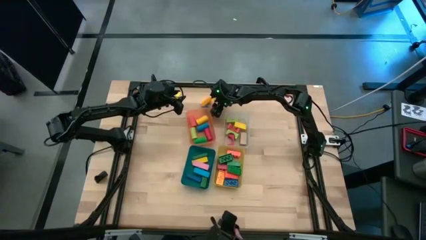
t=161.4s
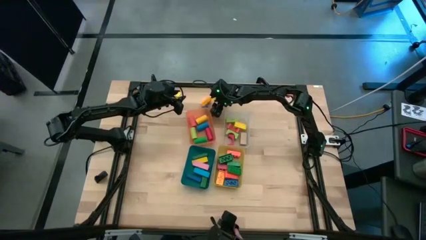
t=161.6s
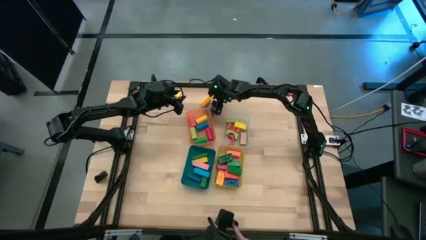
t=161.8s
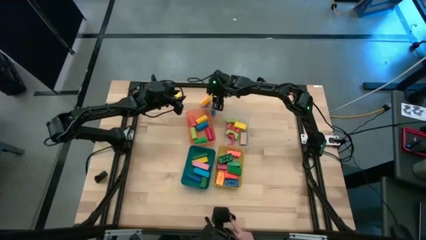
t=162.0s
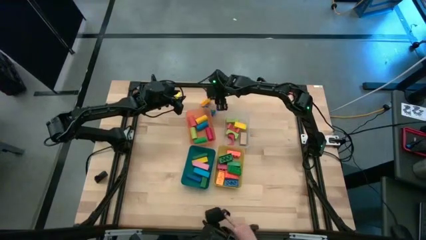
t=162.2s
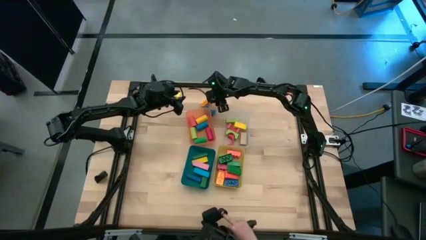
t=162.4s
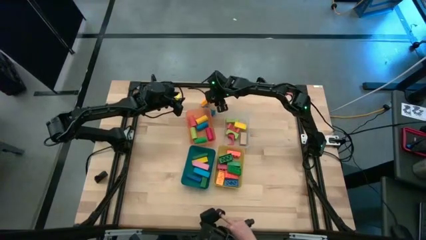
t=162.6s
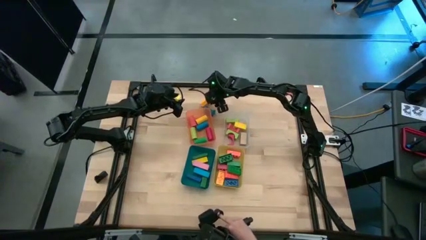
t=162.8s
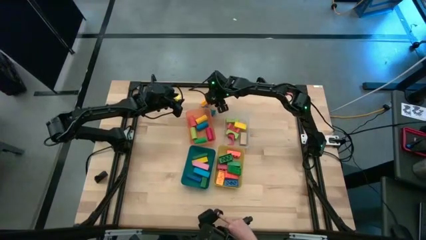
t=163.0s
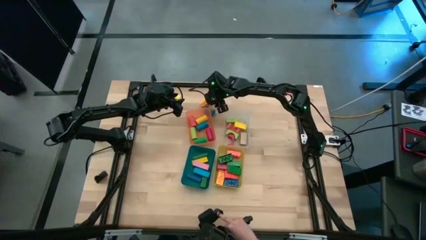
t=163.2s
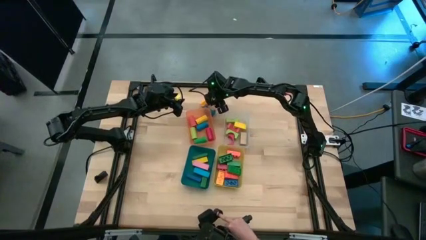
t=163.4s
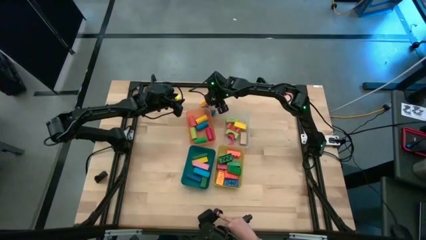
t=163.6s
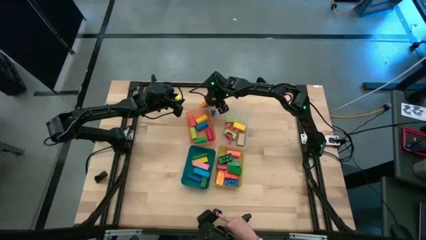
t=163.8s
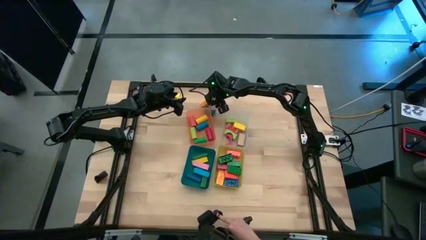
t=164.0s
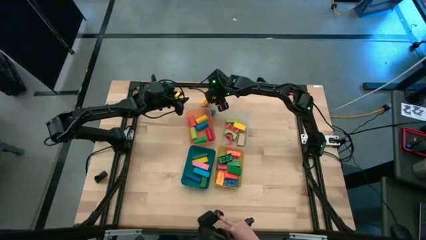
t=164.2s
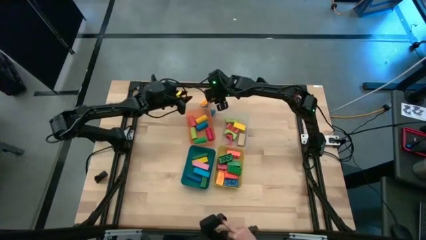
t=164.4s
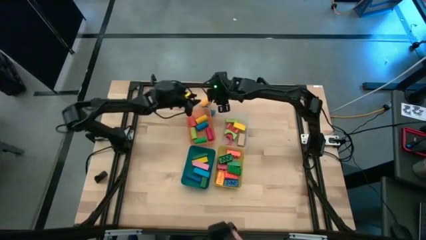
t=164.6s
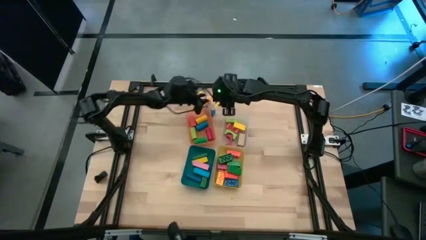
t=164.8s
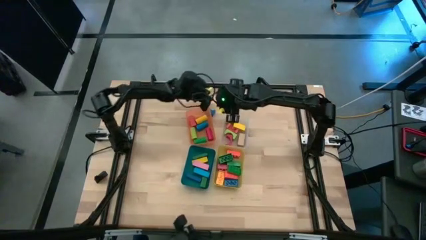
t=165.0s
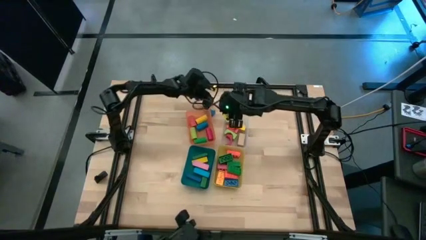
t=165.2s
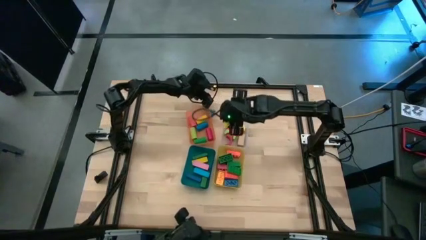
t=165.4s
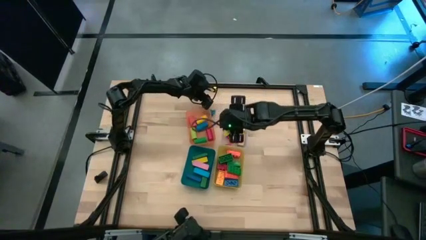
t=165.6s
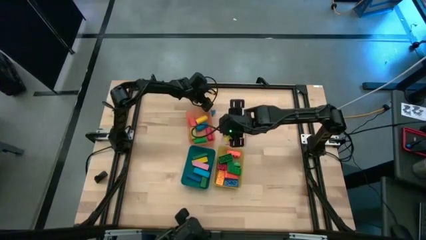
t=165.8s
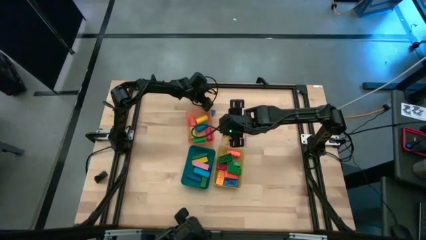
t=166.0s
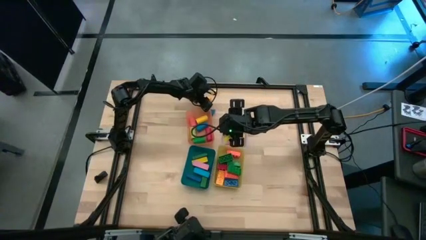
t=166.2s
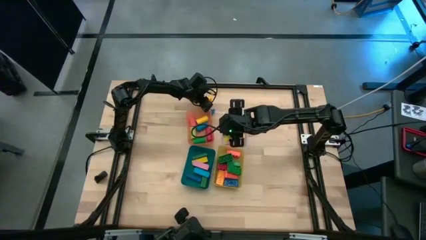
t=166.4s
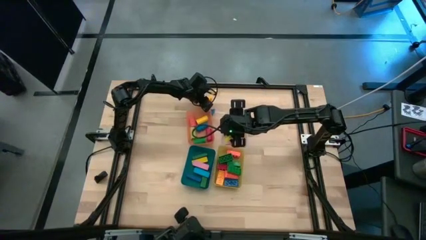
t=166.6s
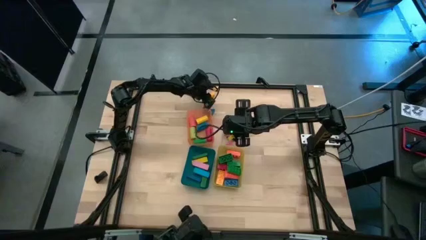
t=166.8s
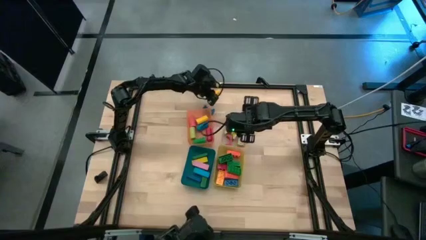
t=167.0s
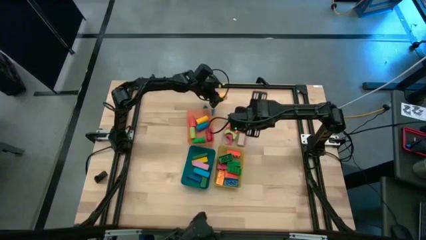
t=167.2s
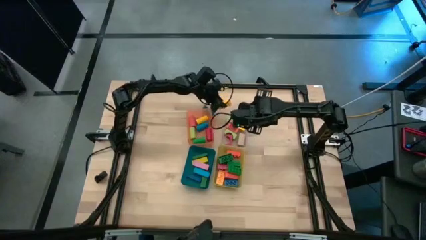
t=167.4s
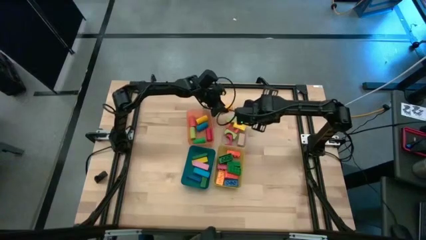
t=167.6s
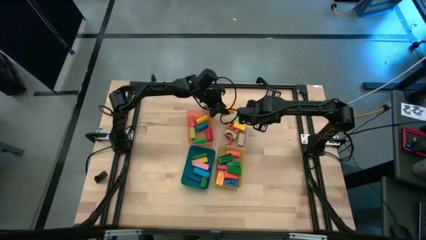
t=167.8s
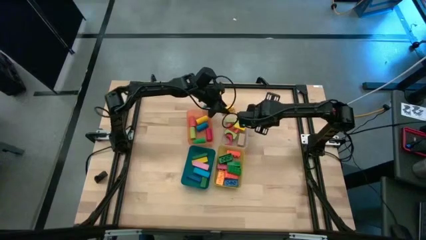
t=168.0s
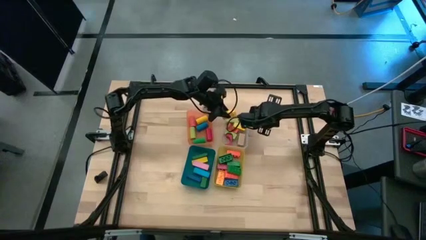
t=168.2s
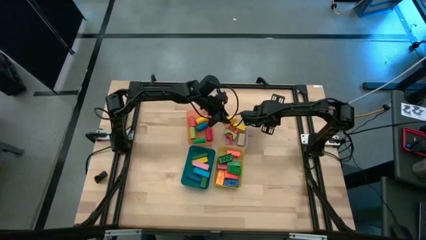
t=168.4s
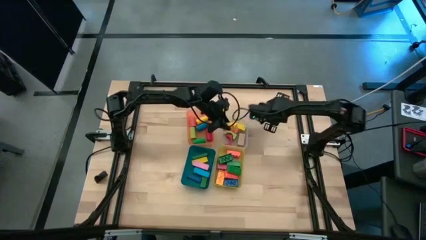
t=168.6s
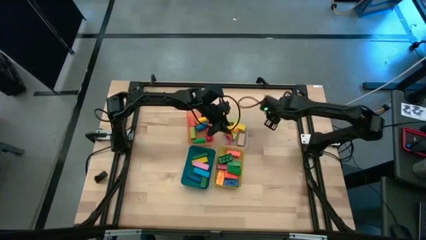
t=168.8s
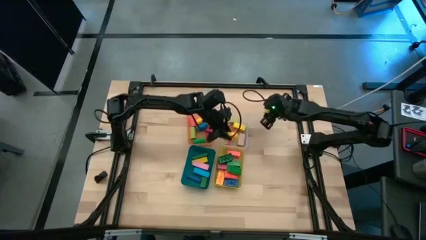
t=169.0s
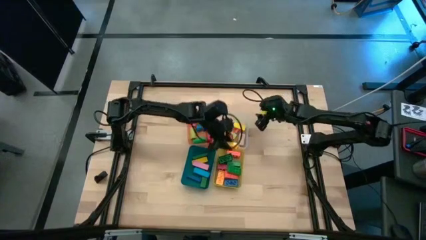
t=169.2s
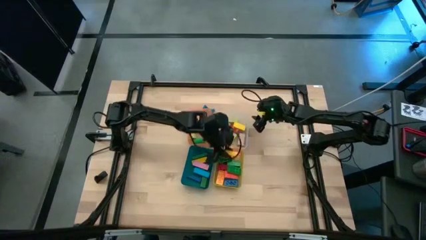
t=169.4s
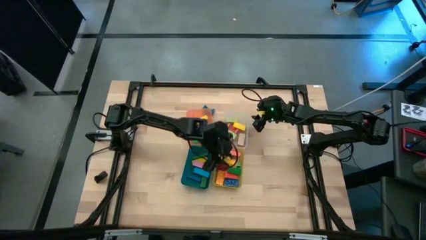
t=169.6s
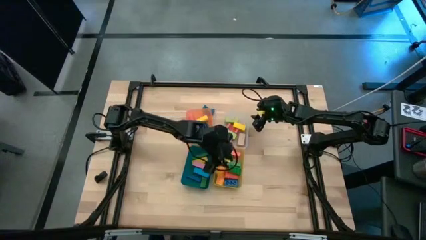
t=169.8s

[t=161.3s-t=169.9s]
Task: Sort blocks by size
Put the yellow game piece into the yellow bin

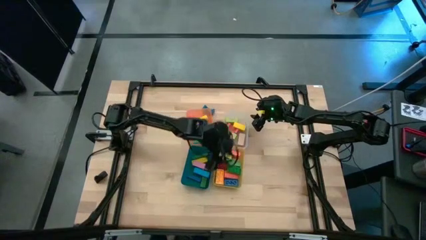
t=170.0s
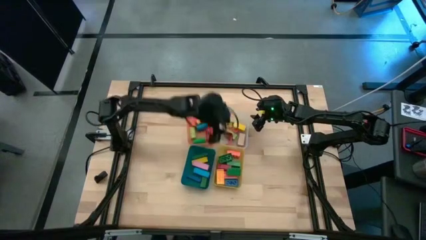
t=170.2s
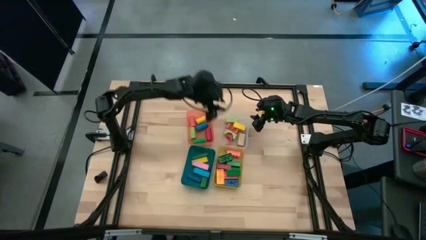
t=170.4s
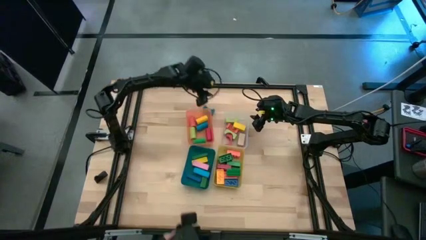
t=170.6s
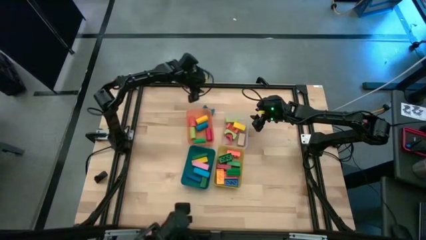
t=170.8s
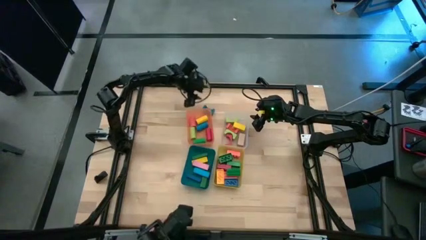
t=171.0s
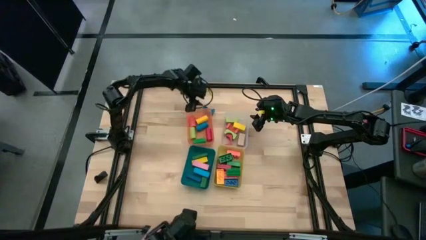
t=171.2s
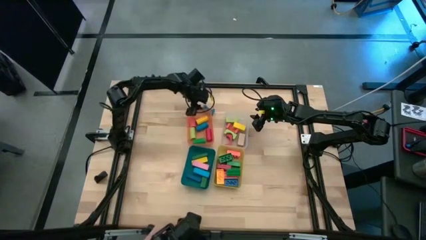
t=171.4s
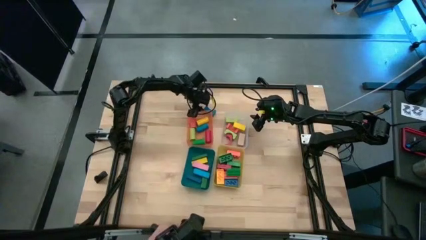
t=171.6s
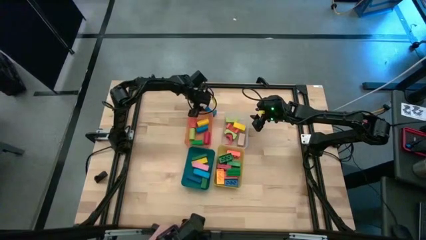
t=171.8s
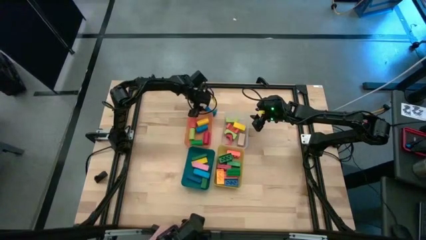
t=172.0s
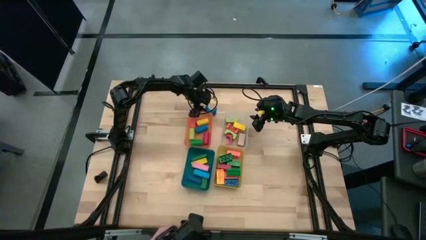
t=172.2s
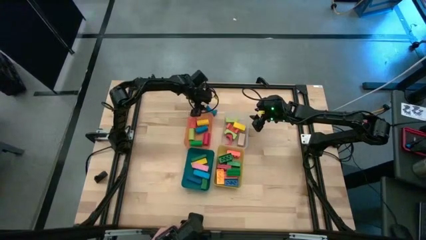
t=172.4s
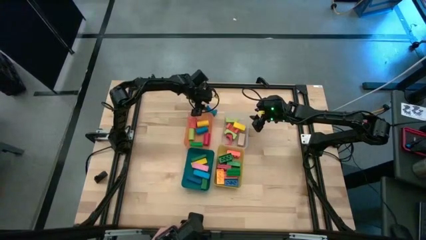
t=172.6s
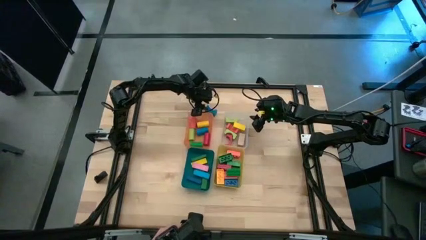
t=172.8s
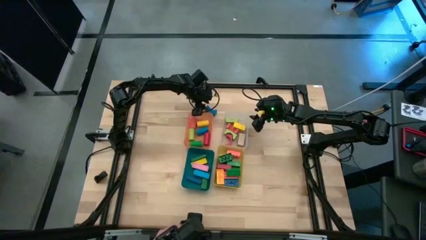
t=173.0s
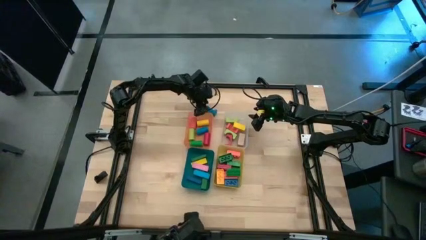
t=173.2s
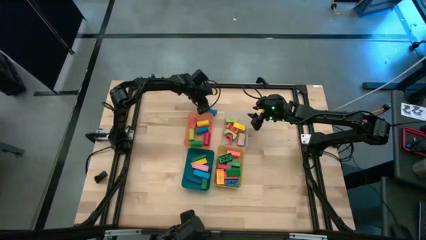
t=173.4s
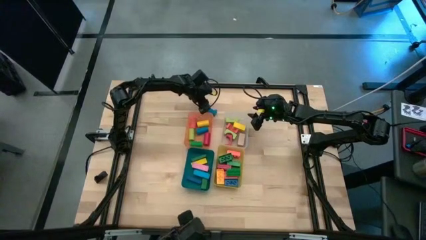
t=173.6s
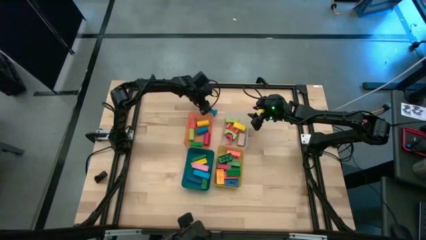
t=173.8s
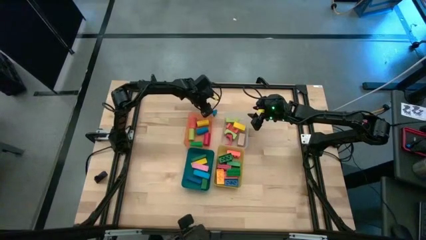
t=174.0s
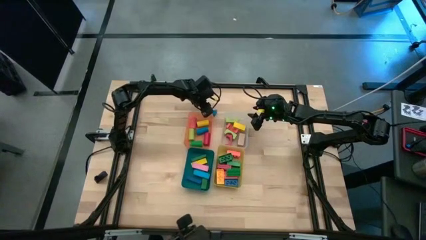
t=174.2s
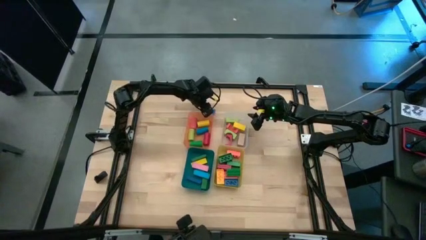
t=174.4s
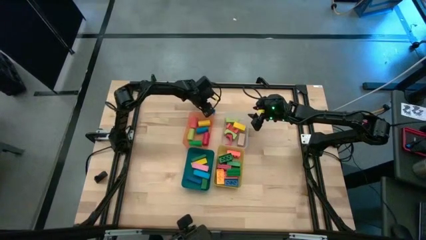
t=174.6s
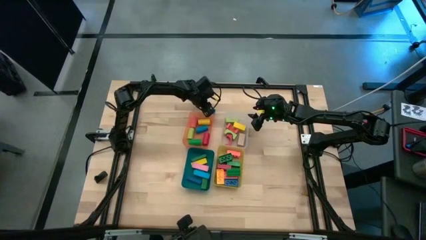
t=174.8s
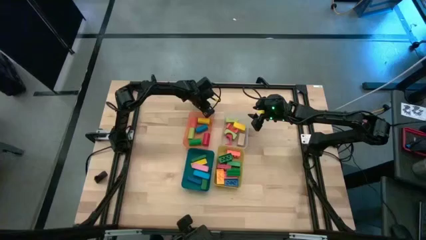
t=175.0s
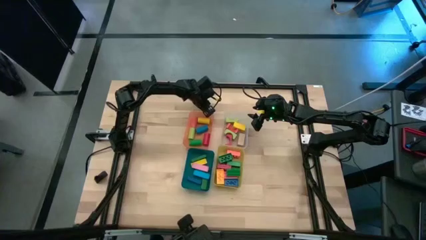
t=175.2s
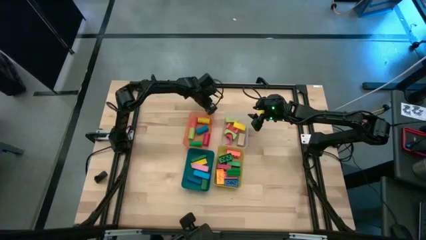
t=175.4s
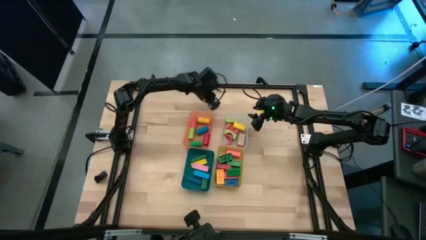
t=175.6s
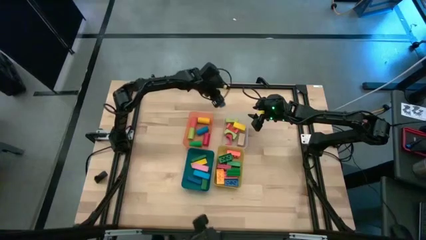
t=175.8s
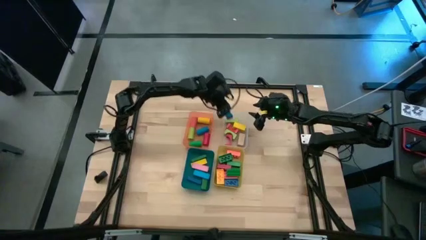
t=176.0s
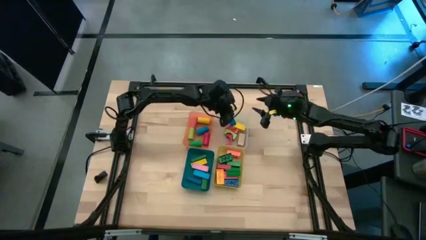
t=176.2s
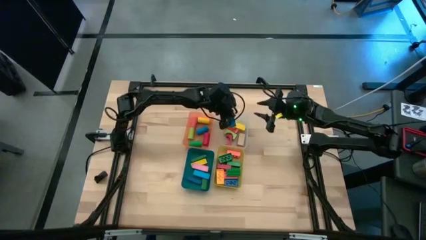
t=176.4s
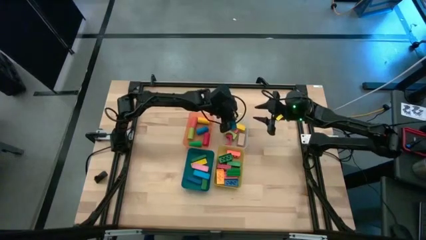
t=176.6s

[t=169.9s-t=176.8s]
Put the blue arch block into the transparent bin
